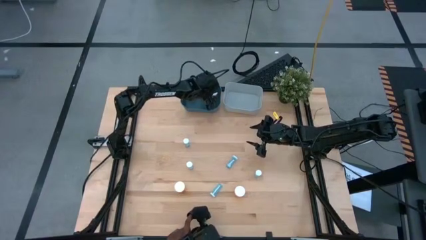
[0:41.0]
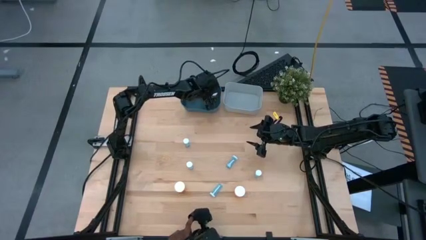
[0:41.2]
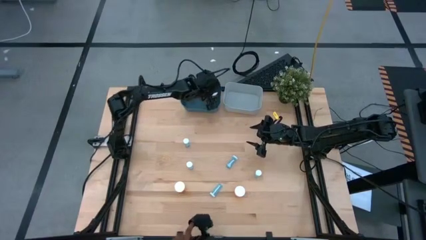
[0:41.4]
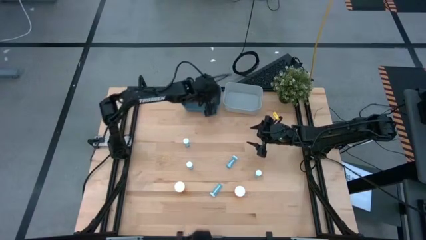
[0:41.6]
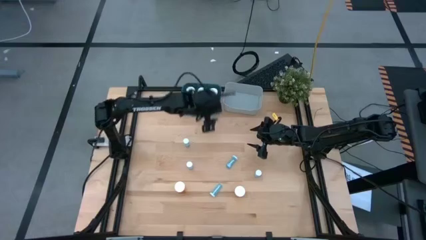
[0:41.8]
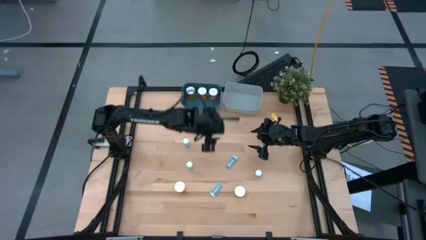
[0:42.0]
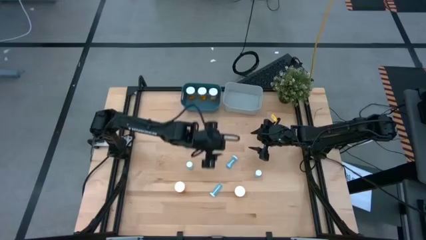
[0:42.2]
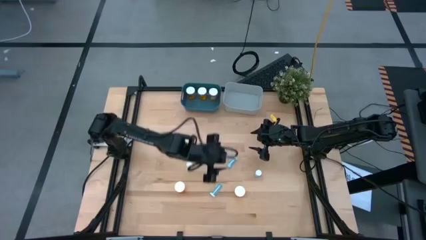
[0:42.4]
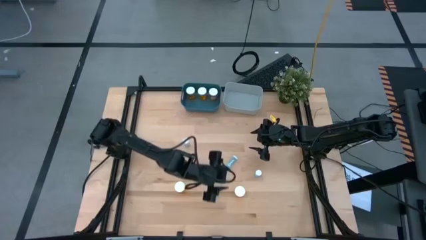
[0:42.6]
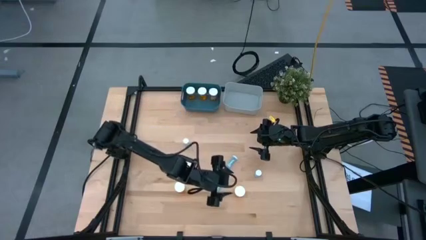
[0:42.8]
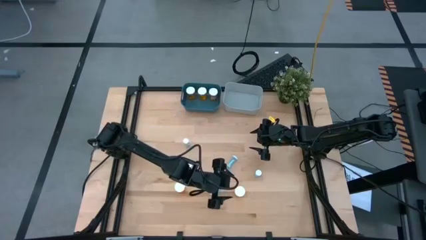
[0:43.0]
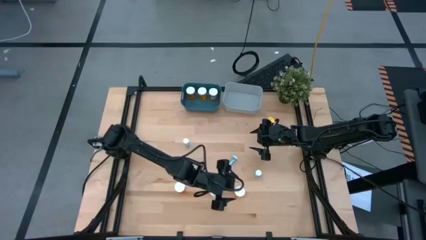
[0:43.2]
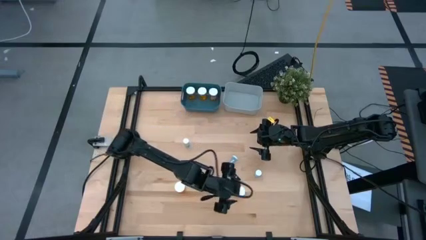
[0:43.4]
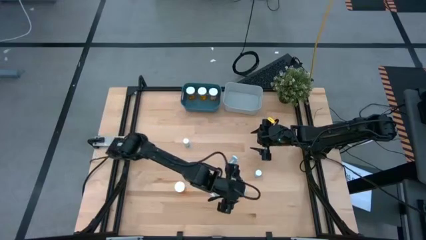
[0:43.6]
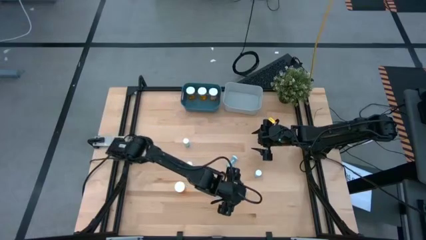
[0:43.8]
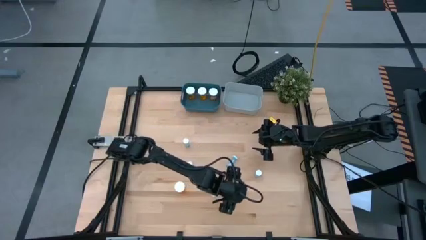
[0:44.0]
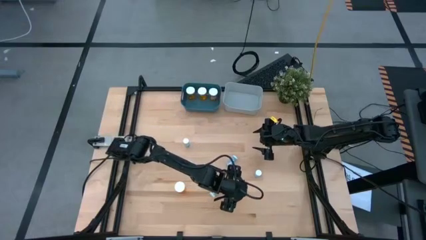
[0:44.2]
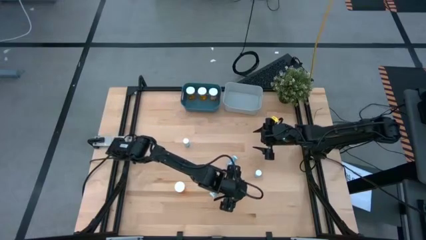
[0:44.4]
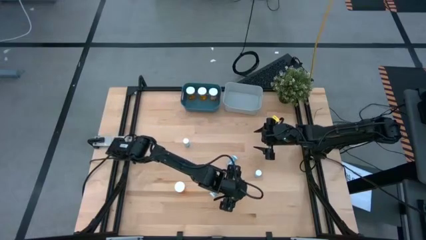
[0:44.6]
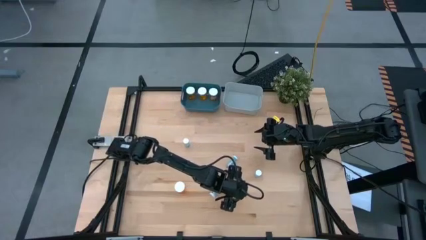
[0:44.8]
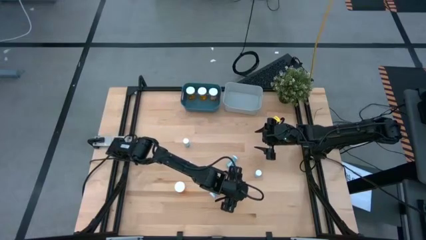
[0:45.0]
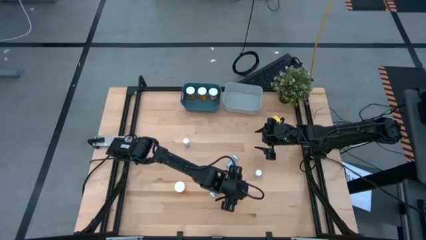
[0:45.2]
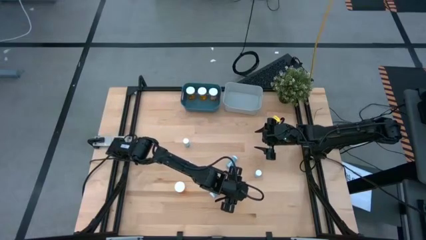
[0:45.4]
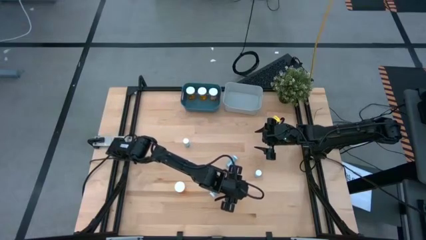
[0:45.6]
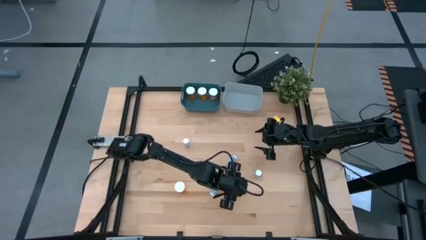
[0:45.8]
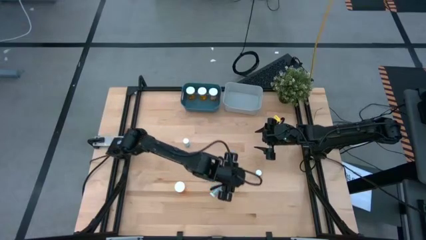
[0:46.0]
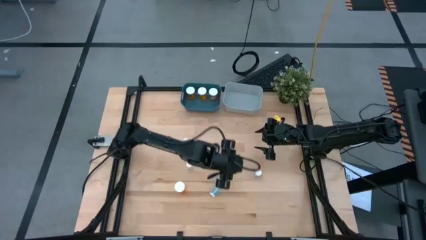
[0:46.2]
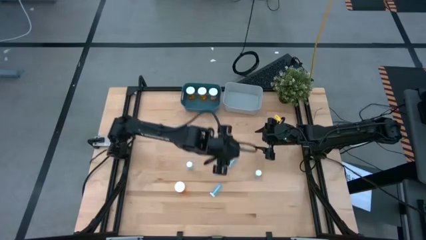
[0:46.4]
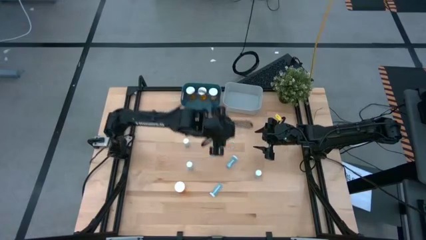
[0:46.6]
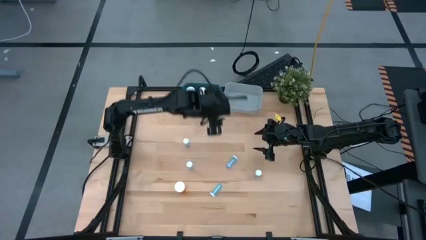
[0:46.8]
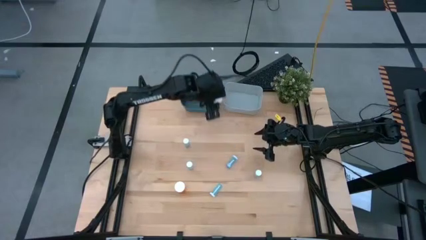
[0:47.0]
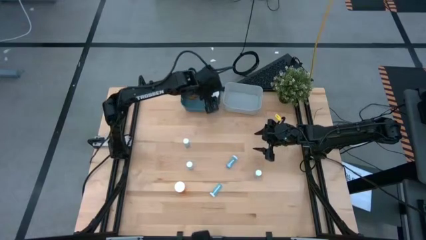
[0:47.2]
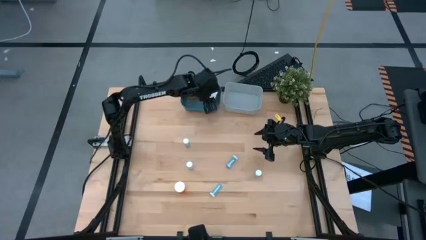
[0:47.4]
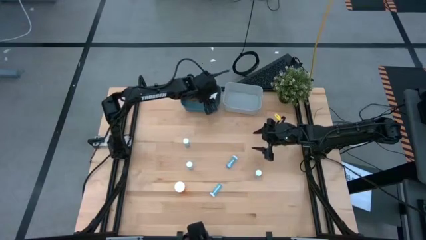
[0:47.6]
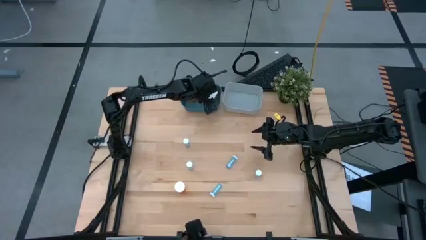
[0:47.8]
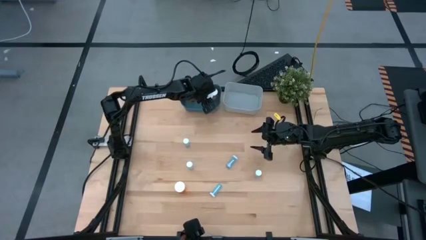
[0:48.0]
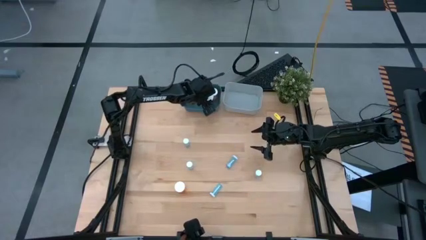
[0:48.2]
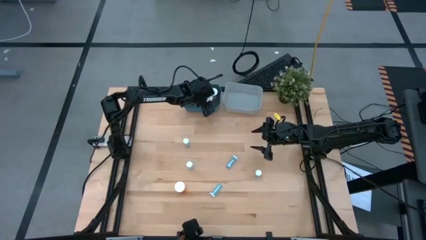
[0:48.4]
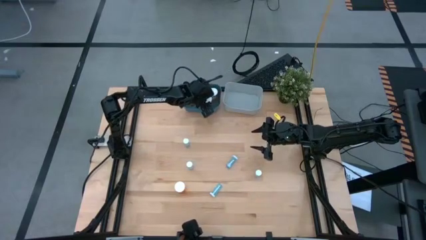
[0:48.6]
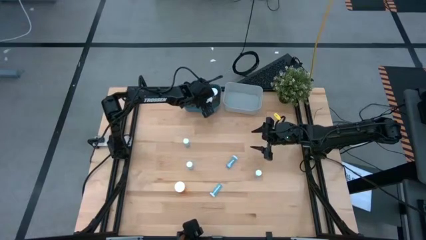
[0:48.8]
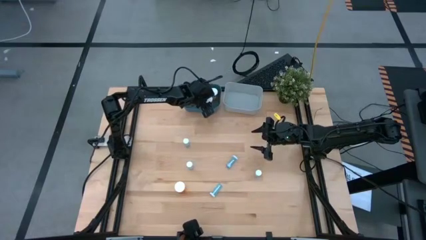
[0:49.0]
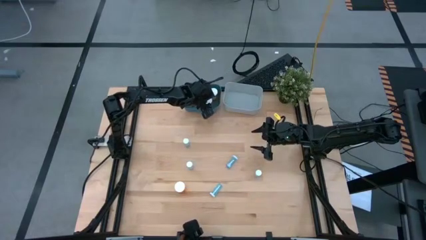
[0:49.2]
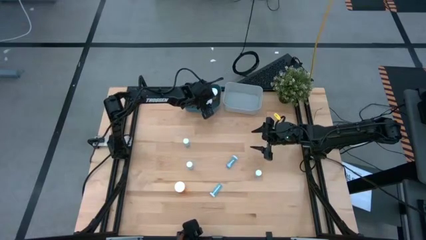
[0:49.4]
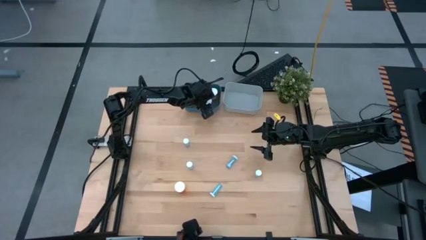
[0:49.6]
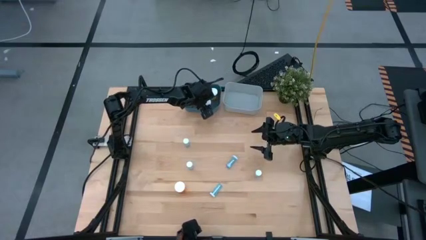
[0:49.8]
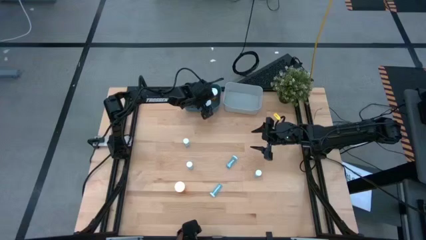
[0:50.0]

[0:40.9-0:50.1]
Task: Pick and place medicine bottles into bin by pill shape (circle, oval)
Put the orange pill bottle into the blue bin

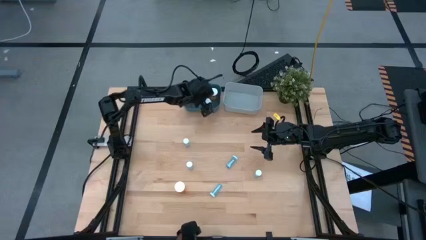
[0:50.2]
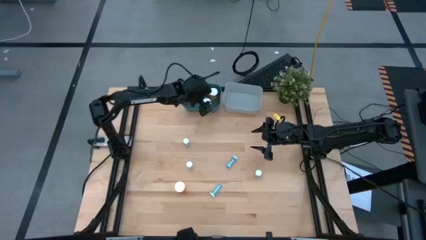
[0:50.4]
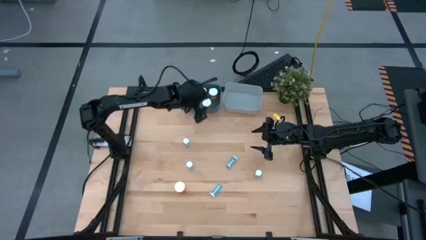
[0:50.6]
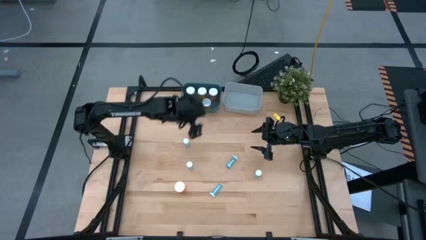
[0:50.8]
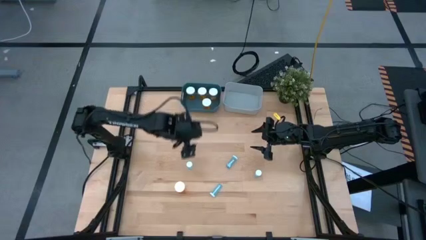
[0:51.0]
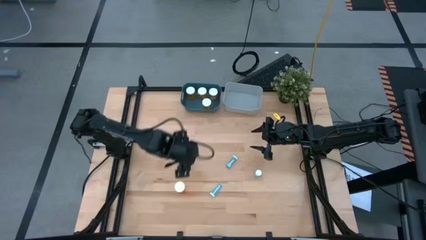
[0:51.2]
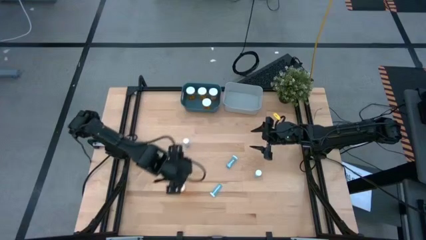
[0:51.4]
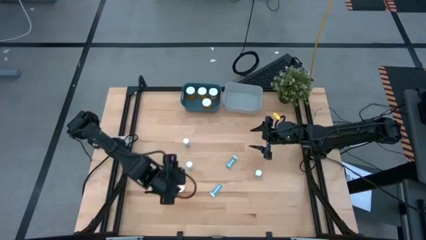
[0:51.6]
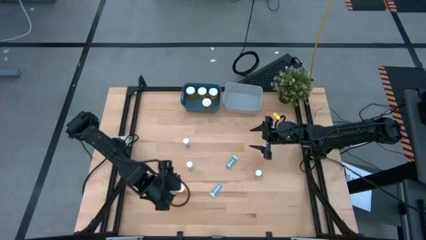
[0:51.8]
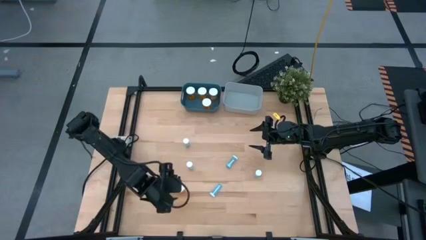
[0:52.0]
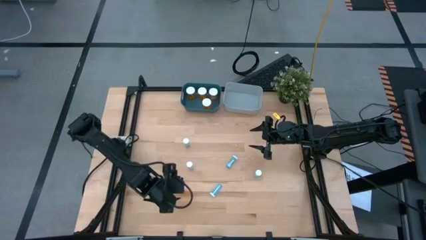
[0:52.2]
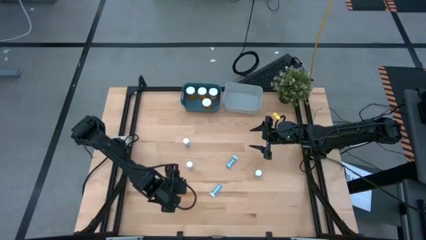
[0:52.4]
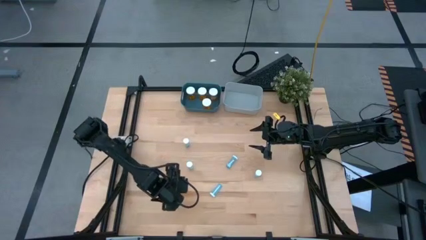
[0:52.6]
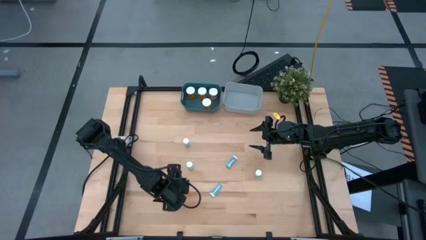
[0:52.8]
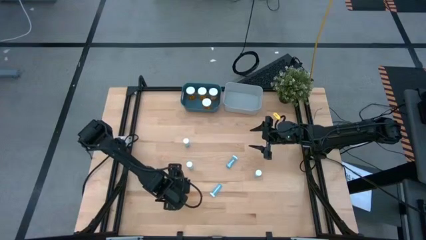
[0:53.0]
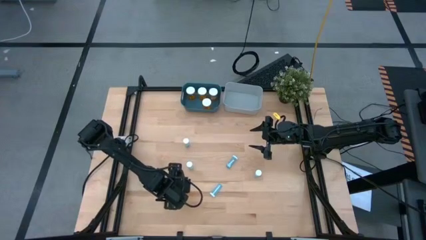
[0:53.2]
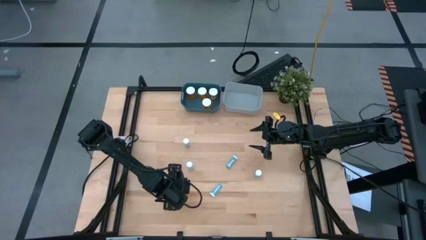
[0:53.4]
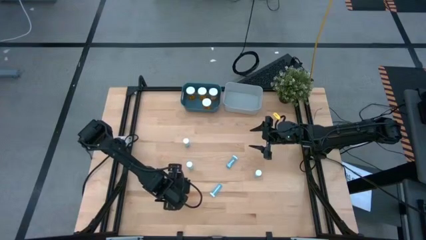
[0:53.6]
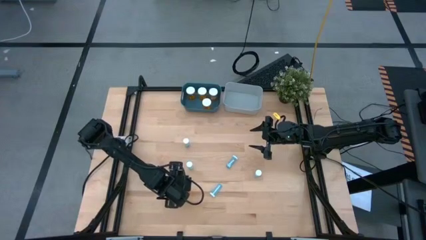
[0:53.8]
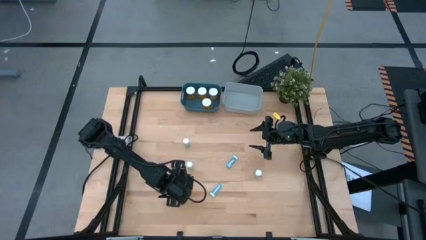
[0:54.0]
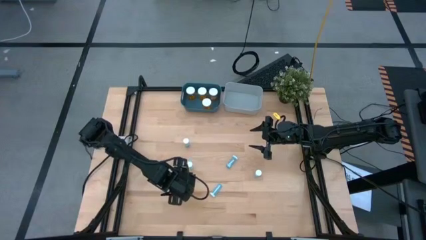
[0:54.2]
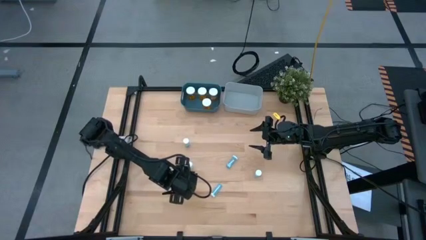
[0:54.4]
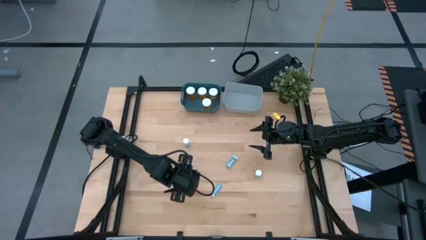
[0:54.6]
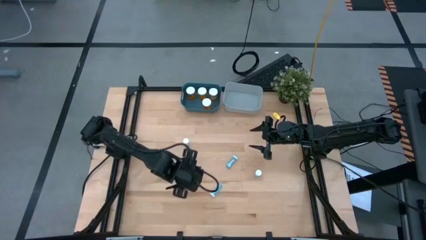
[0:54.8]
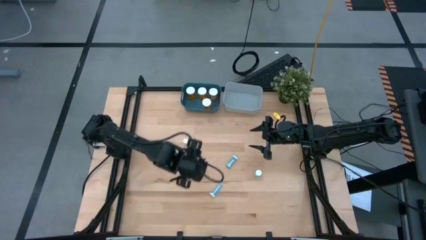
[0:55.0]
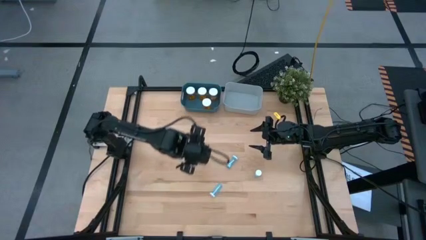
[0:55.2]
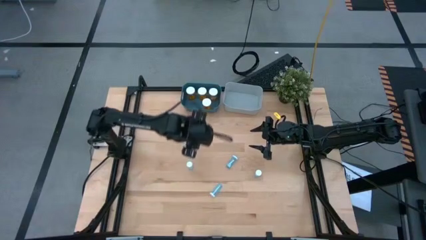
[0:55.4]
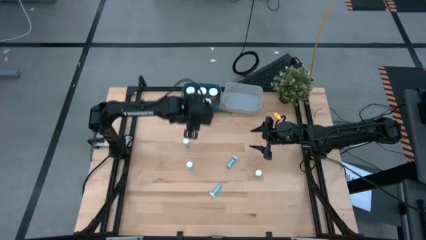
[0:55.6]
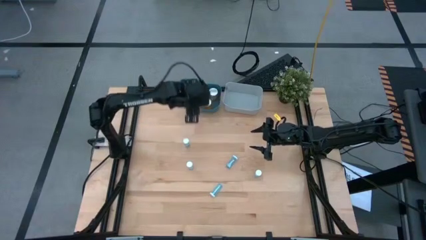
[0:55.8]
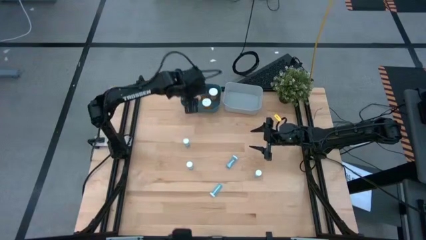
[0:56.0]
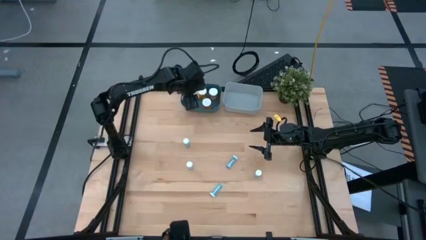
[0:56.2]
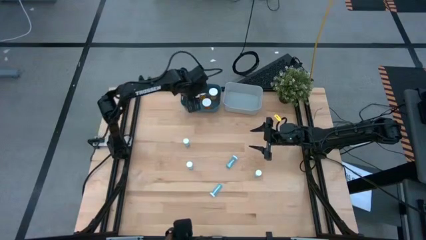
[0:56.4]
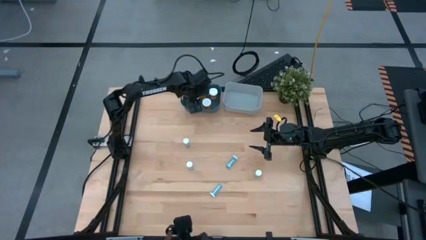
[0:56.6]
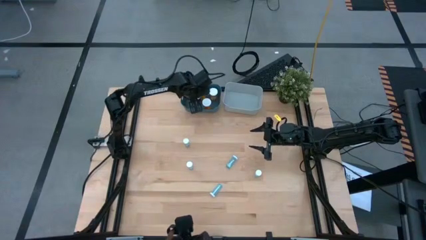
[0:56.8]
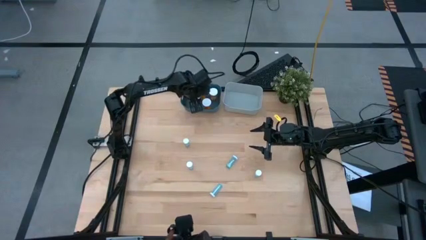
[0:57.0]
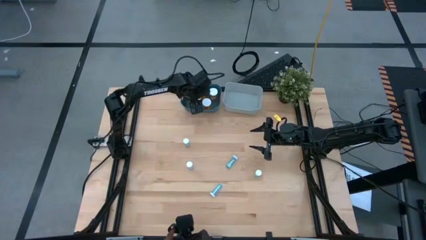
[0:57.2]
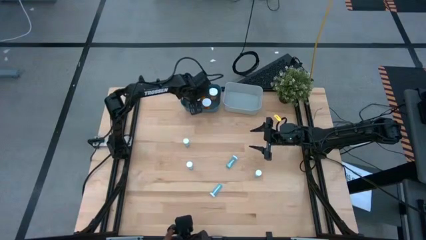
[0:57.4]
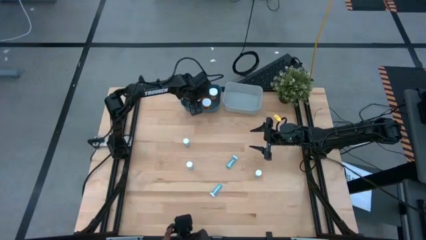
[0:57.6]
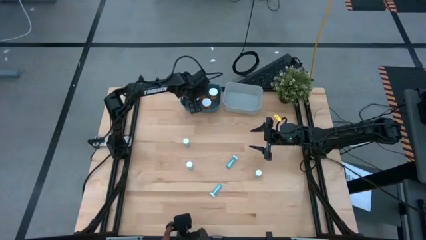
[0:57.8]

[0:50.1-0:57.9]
Put the orange pill bottle into the blue bin
